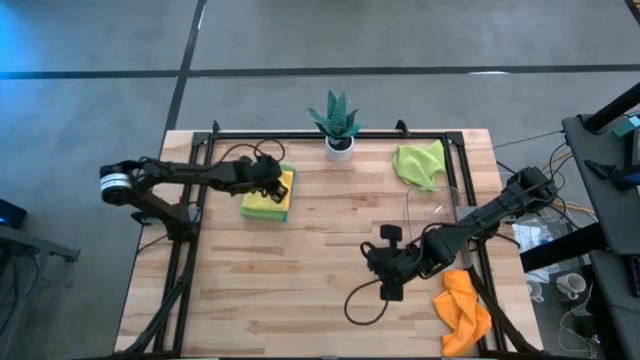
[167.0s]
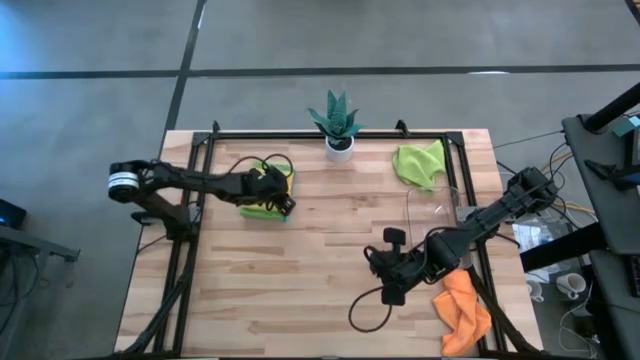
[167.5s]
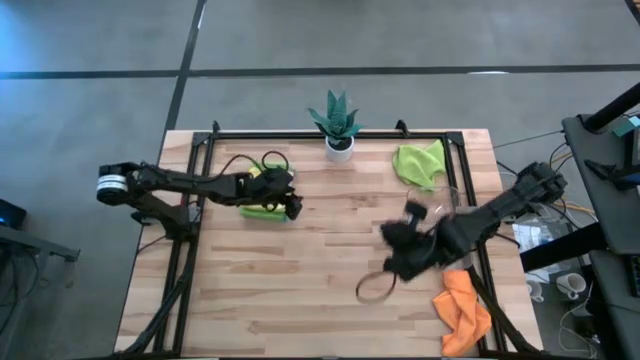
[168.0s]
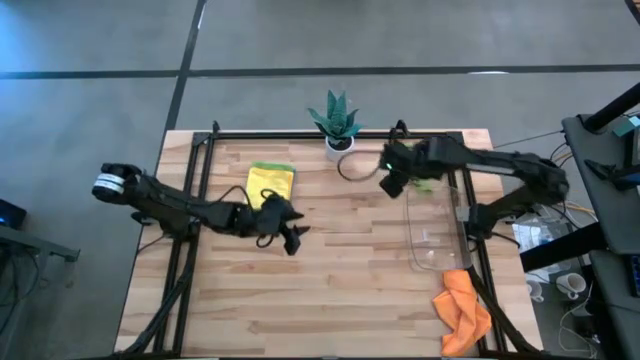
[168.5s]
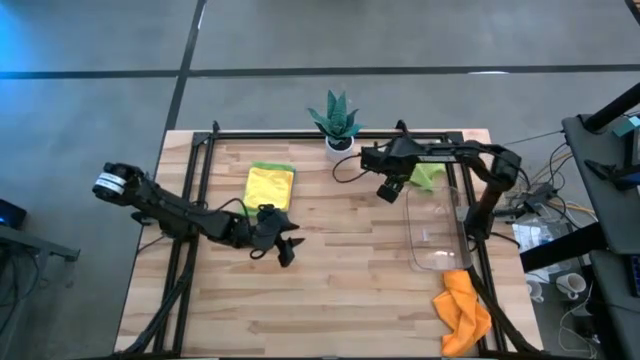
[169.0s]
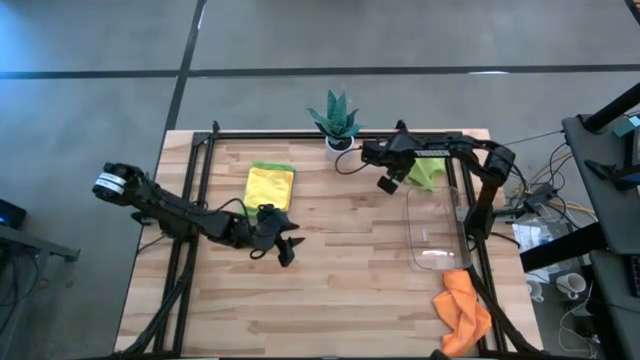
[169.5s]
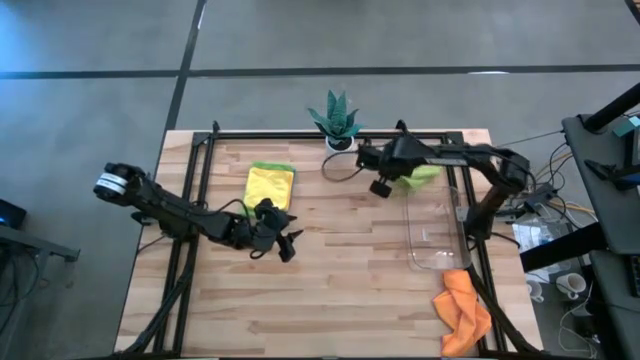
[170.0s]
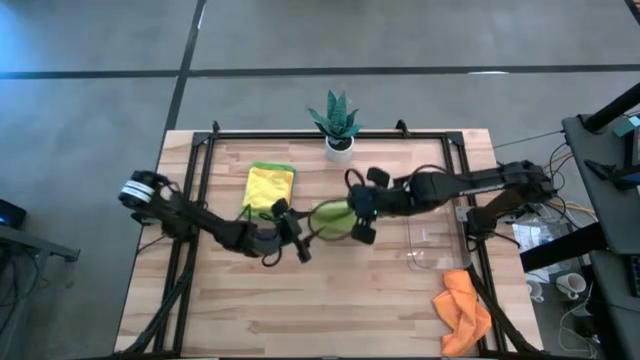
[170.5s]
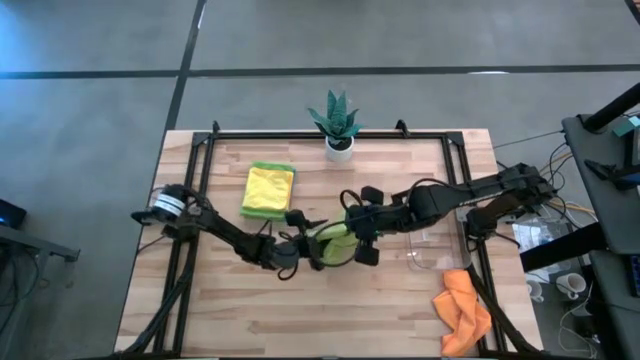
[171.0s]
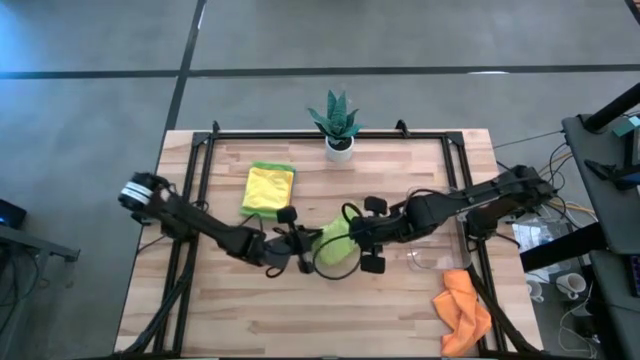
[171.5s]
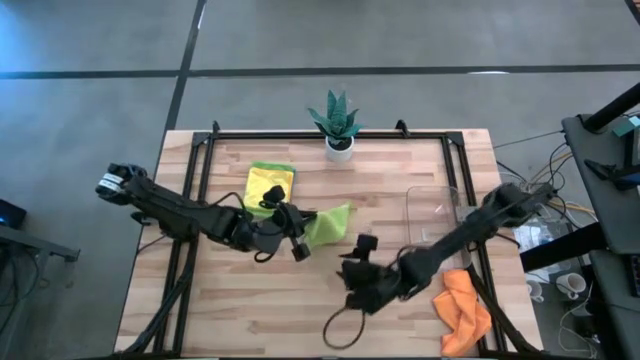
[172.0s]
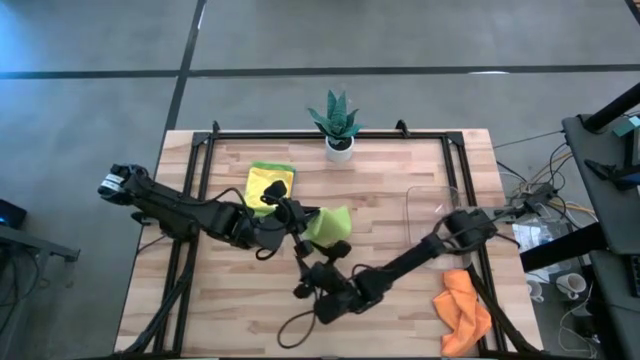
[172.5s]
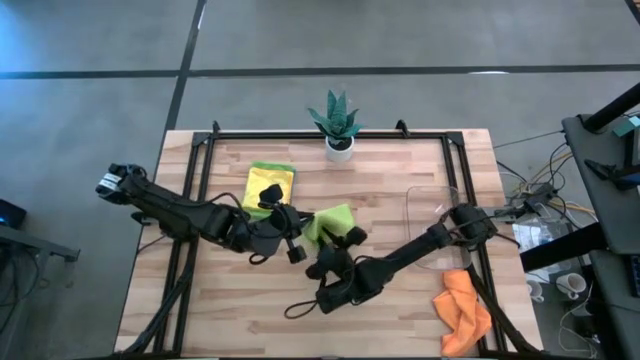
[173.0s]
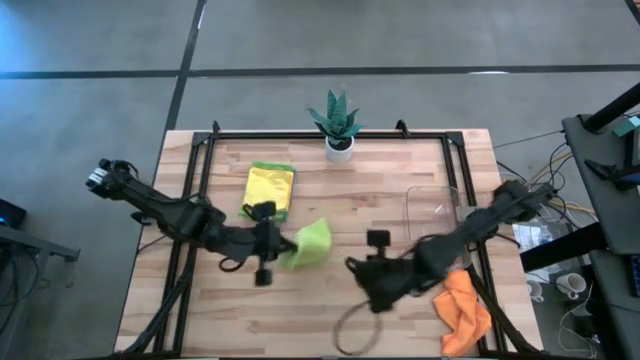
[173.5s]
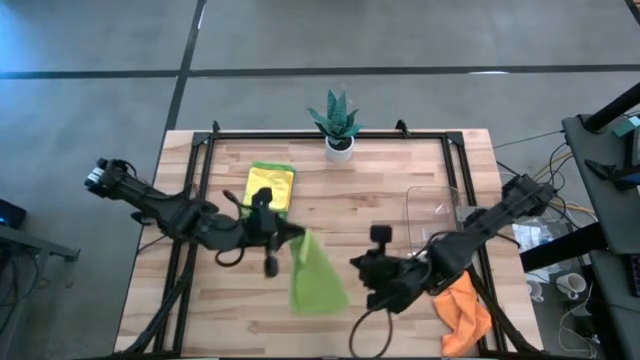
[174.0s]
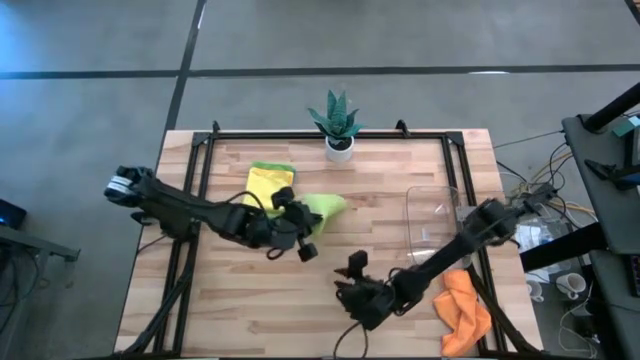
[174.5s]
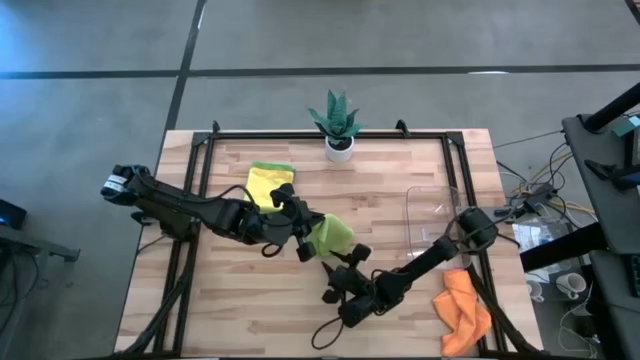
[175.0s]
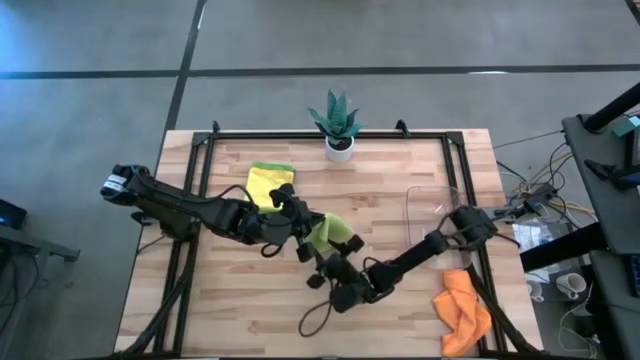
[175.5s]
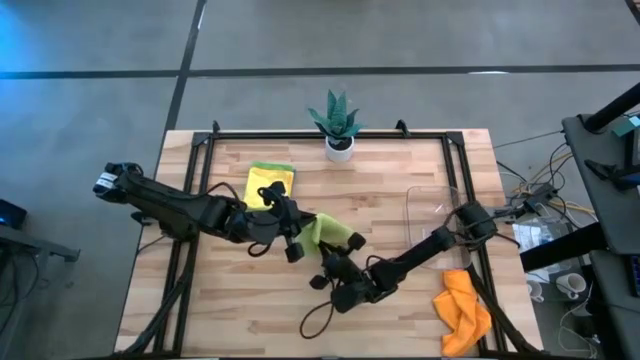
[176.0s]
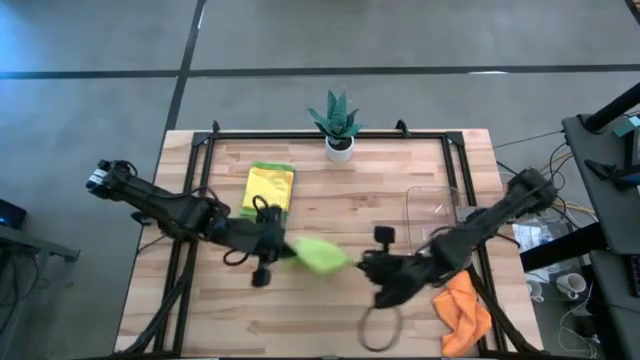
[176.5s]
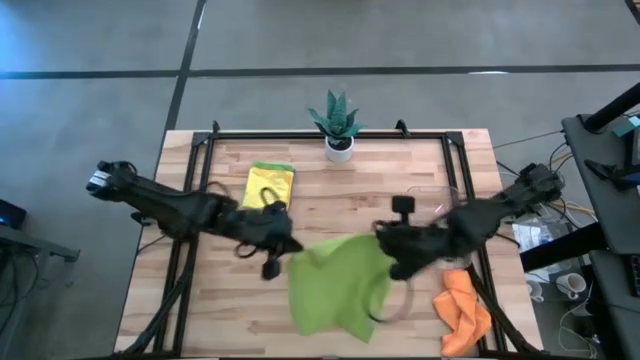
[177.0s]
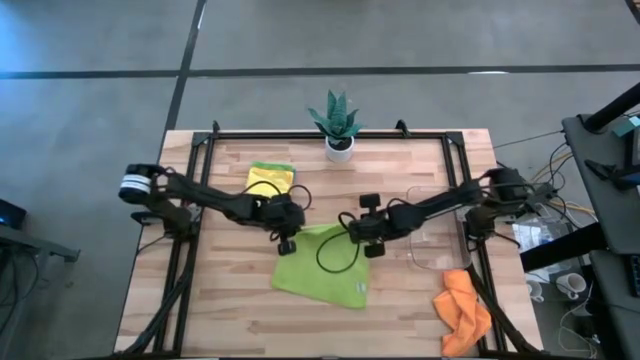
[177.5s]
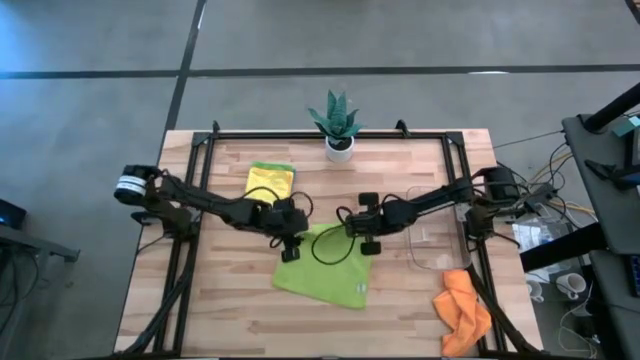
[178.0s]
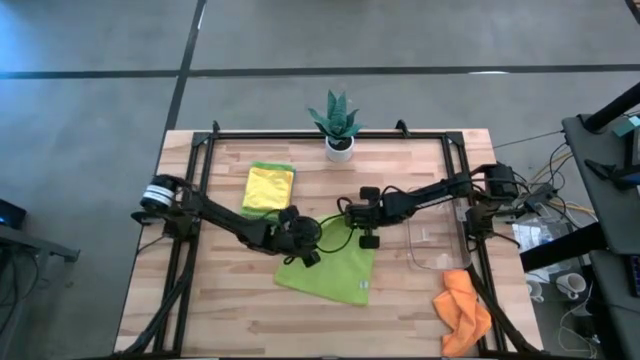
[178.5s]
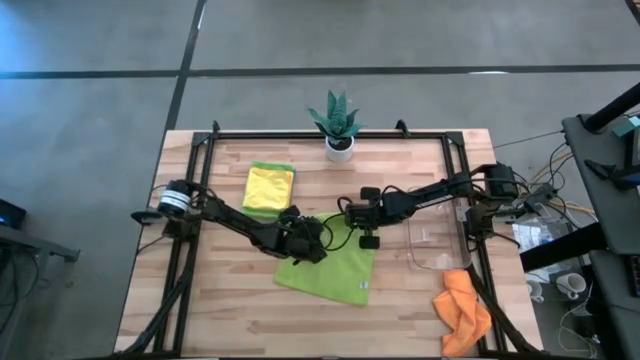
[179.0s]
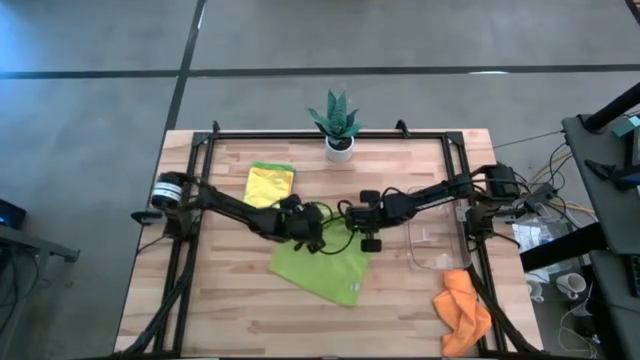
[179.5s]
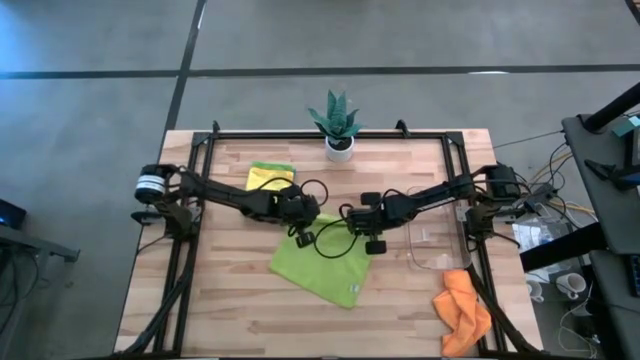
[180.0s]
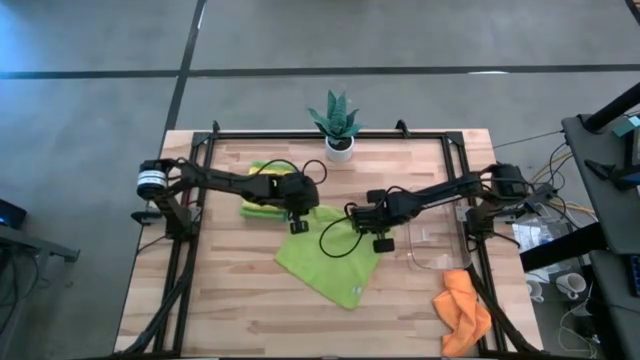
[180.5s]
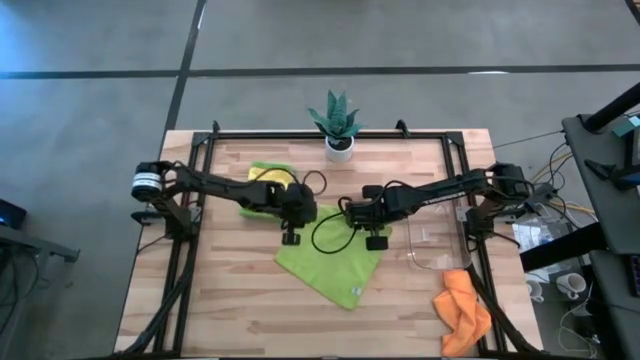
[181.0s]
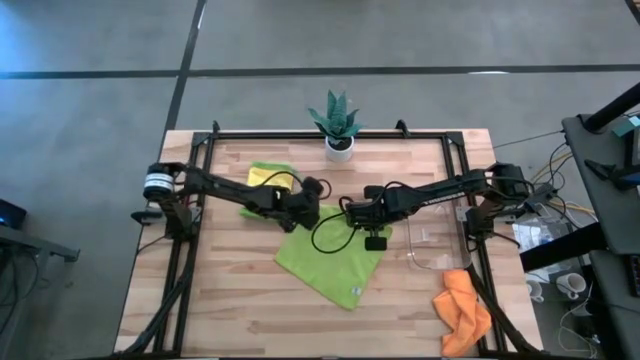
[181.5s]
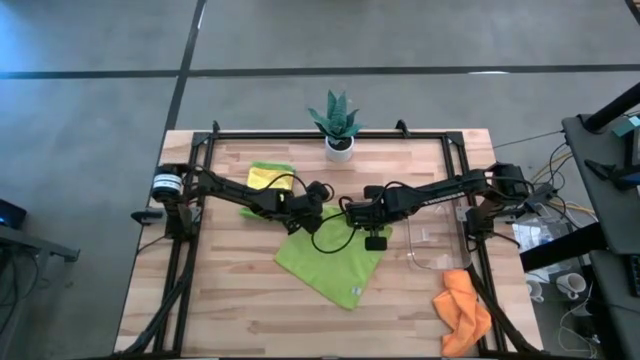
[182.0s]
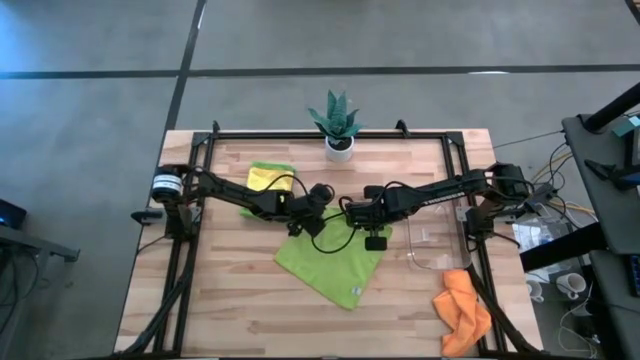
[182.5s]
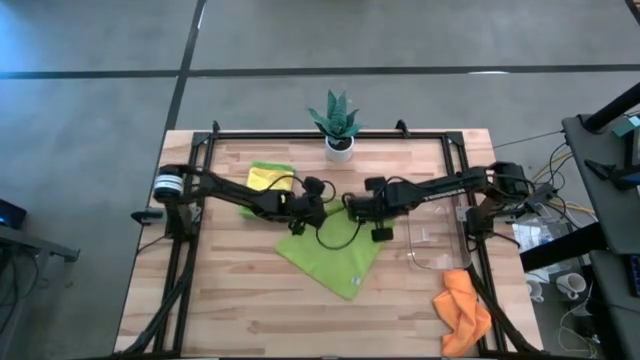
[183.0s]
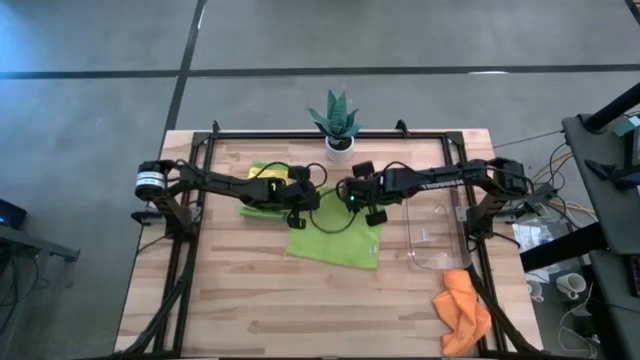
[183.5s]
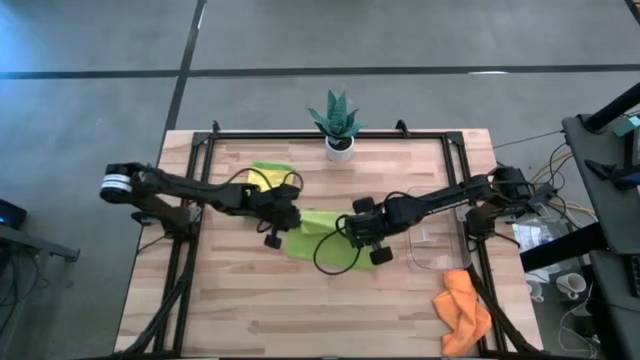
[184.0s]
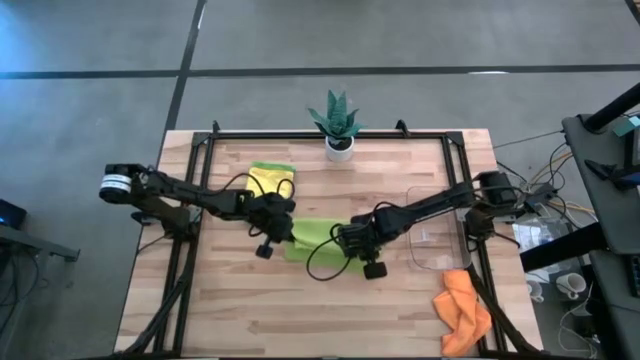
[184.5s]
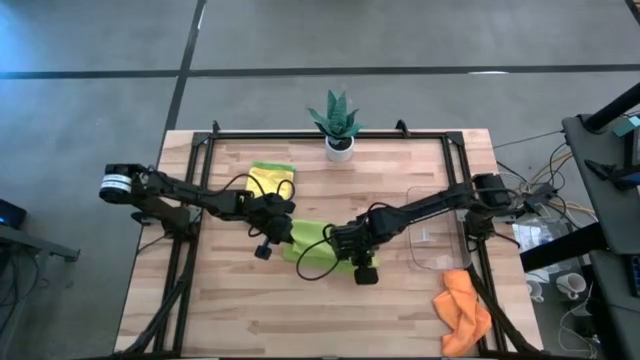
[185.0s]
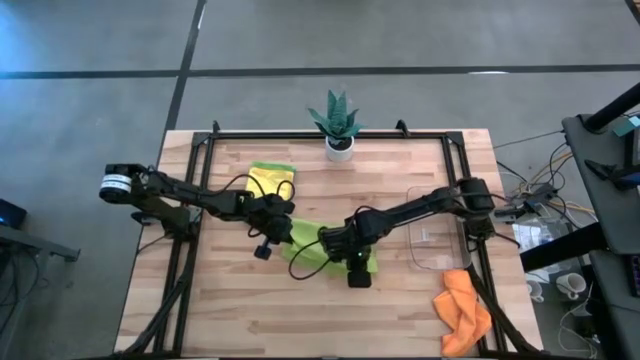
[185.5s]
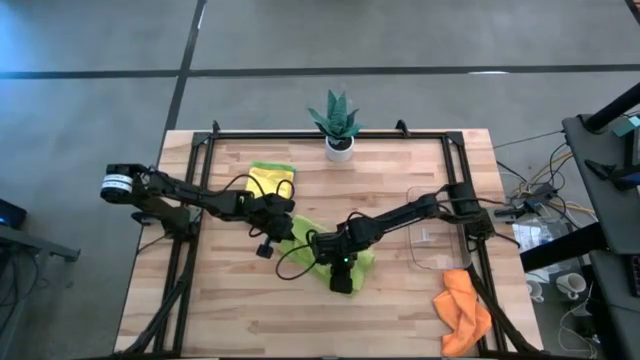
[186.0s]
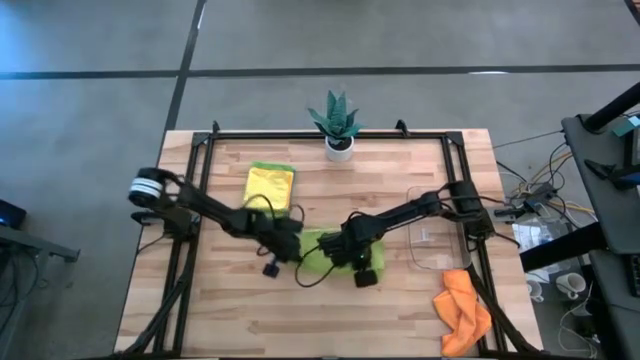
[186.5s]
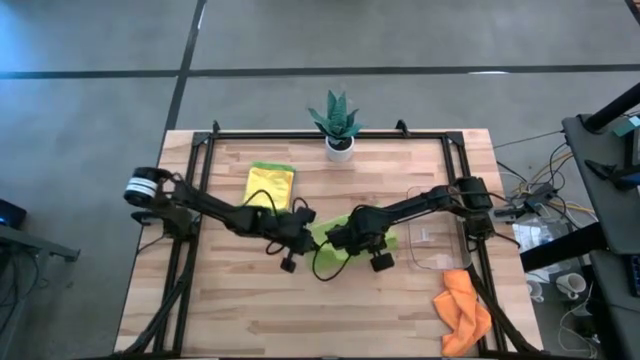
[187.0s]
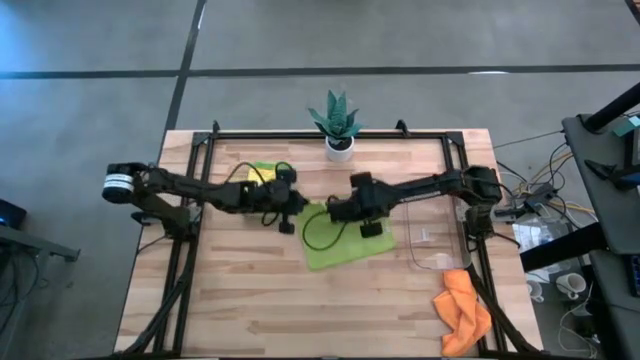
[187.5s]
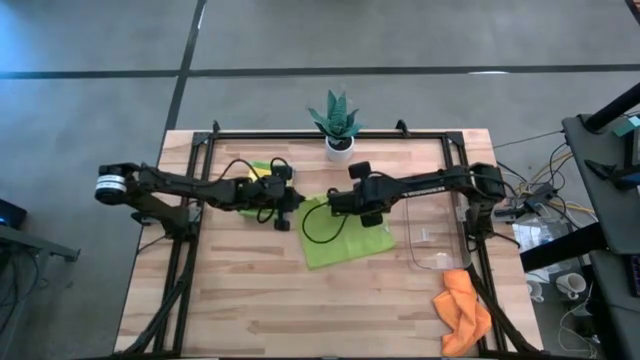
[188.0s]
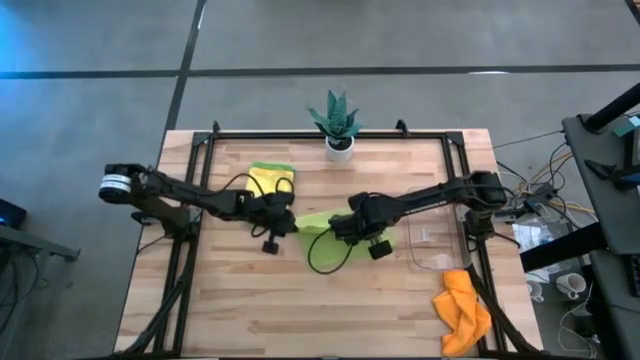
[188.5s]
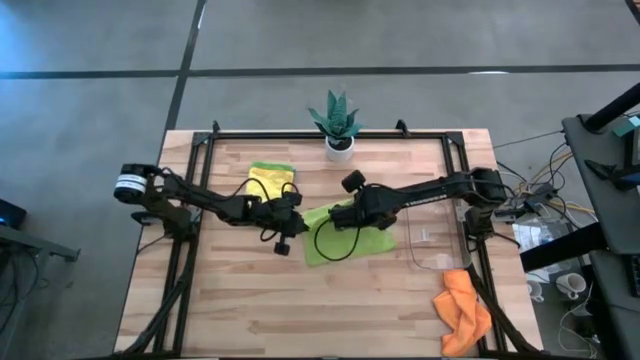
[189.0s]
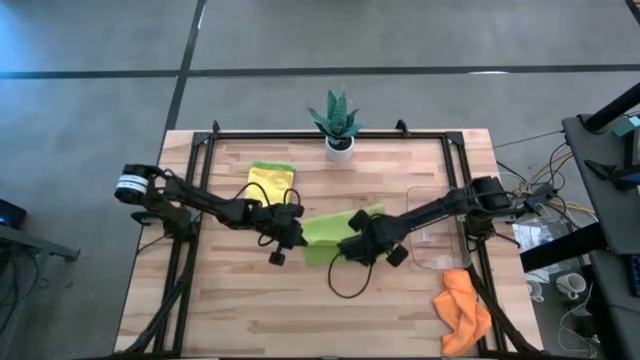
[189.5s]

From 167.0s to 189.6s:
Task: Fold microfiber towels
Fold the light green towel on the table
